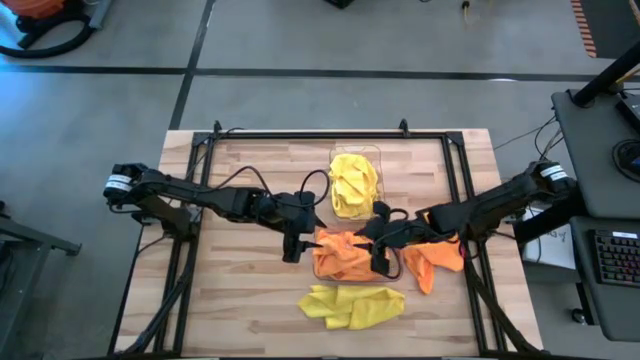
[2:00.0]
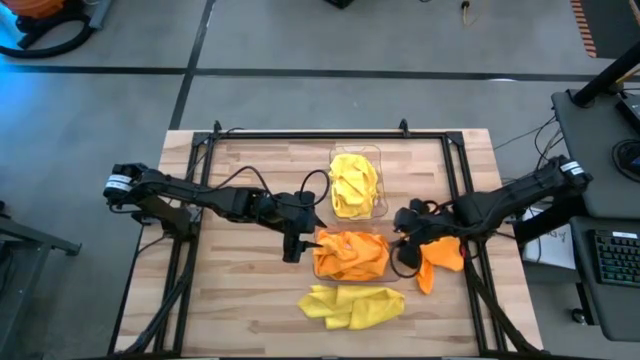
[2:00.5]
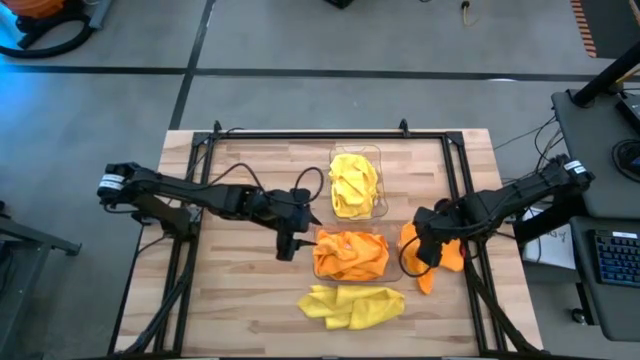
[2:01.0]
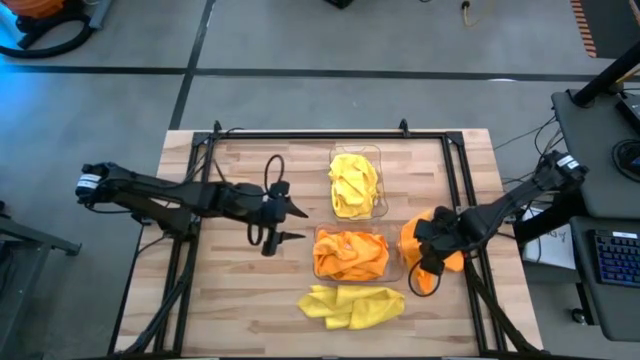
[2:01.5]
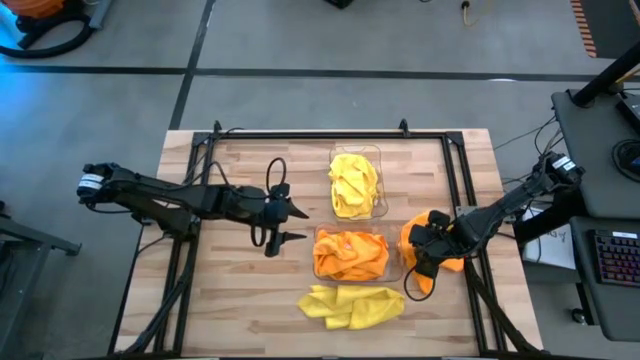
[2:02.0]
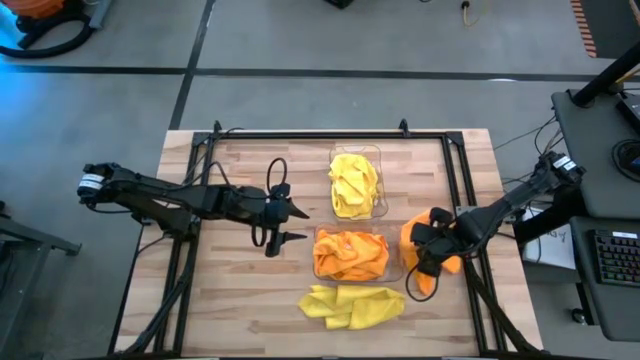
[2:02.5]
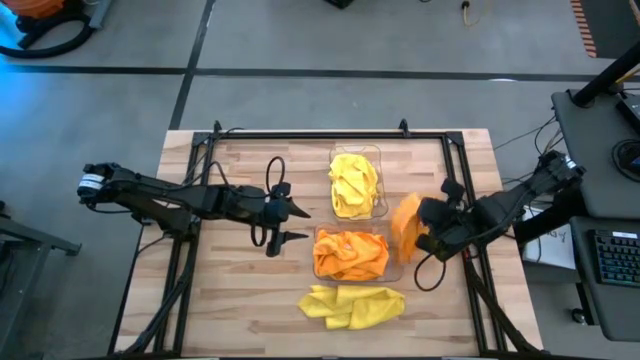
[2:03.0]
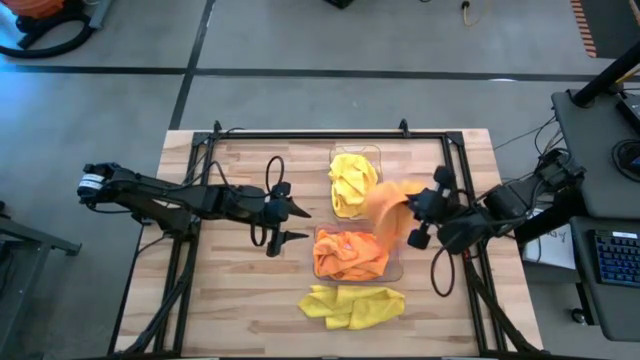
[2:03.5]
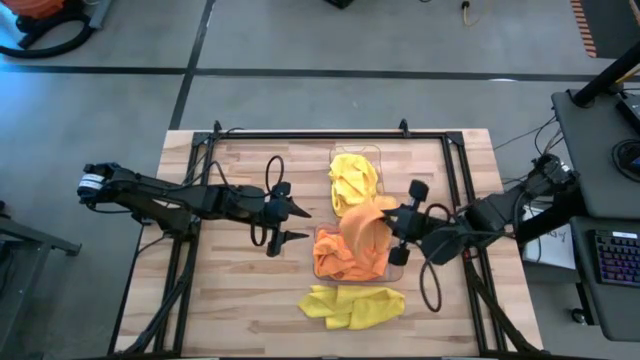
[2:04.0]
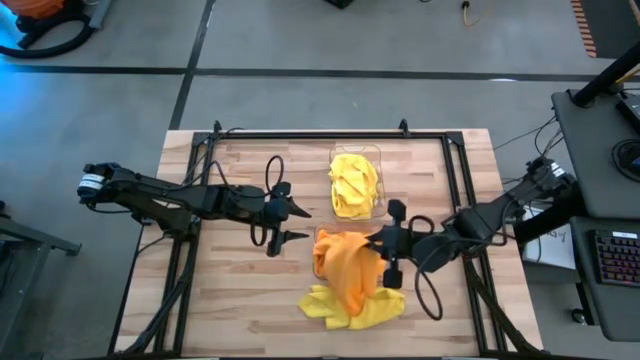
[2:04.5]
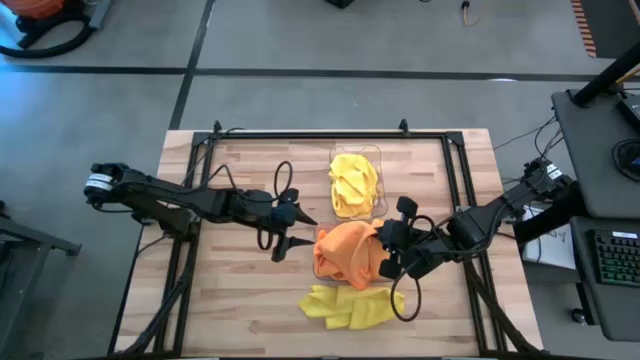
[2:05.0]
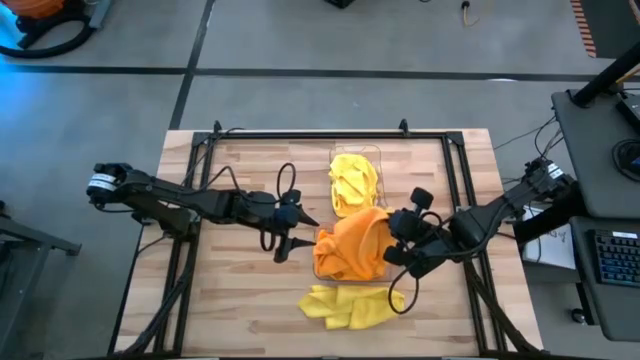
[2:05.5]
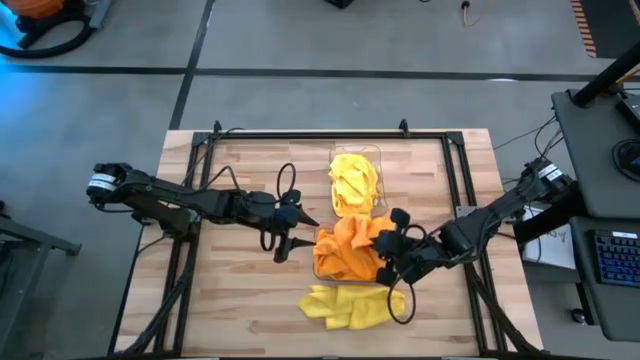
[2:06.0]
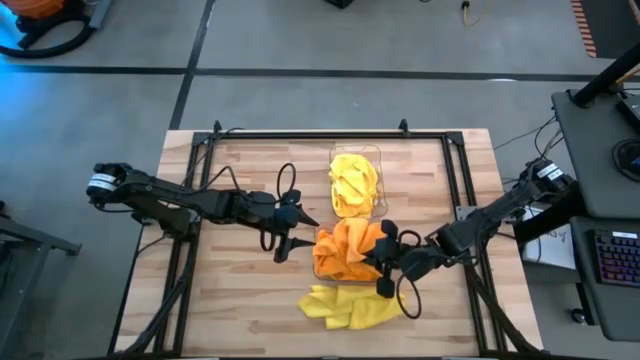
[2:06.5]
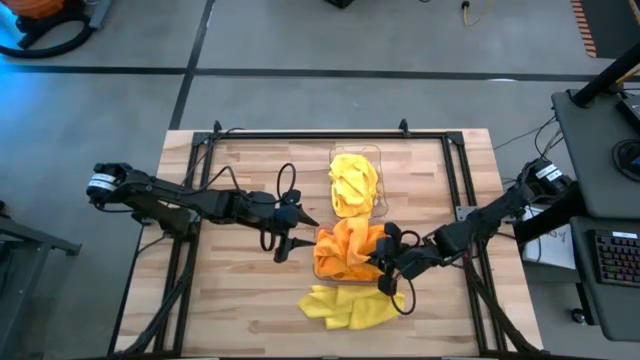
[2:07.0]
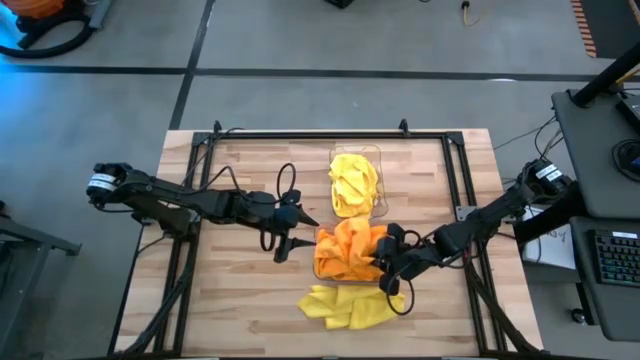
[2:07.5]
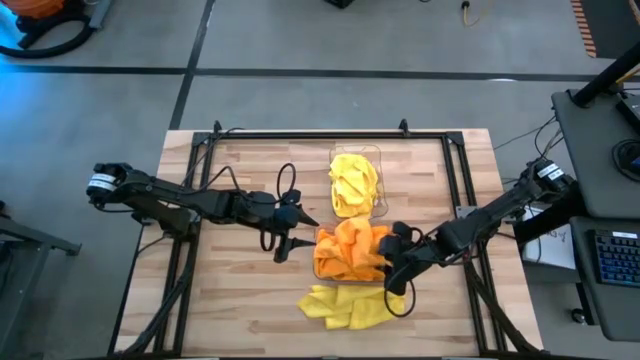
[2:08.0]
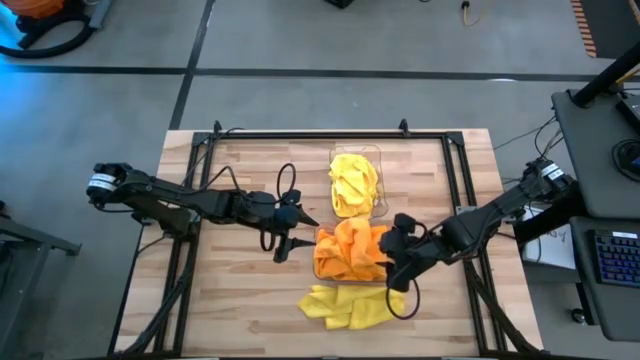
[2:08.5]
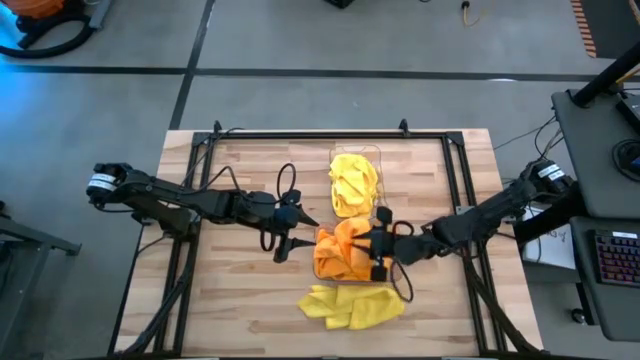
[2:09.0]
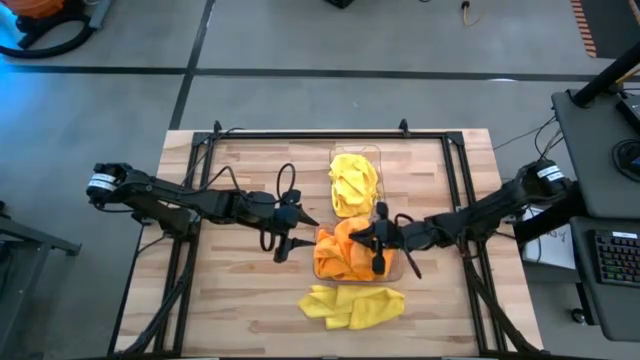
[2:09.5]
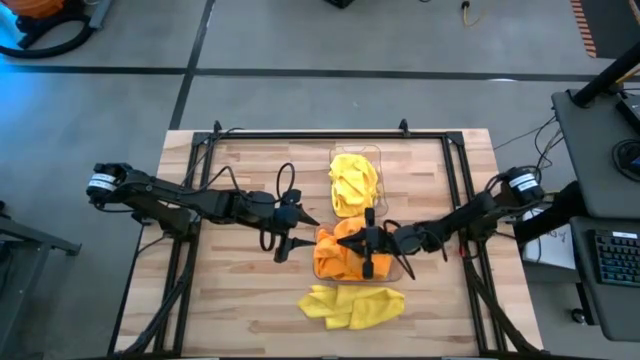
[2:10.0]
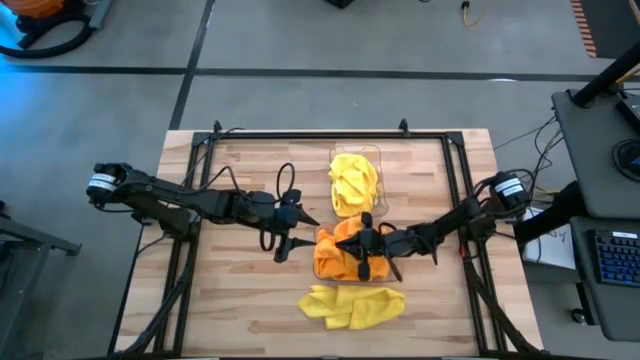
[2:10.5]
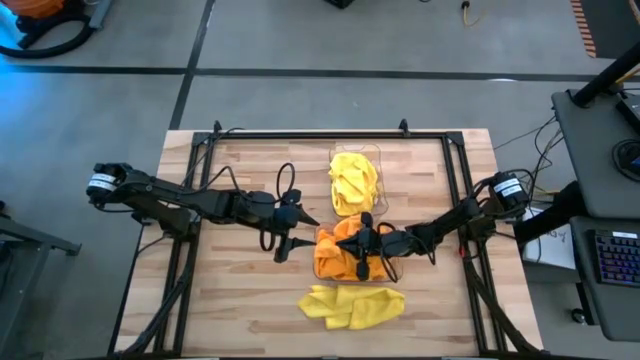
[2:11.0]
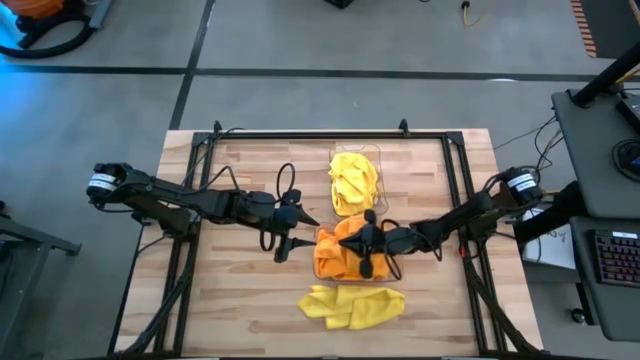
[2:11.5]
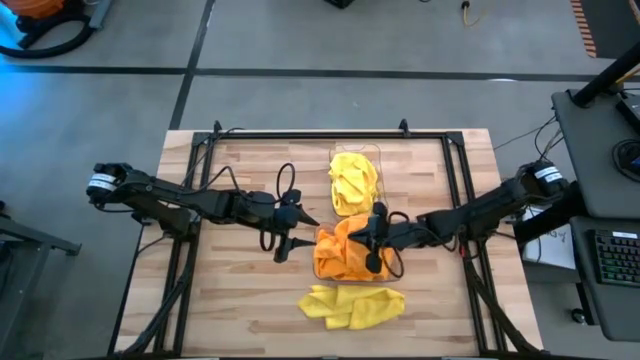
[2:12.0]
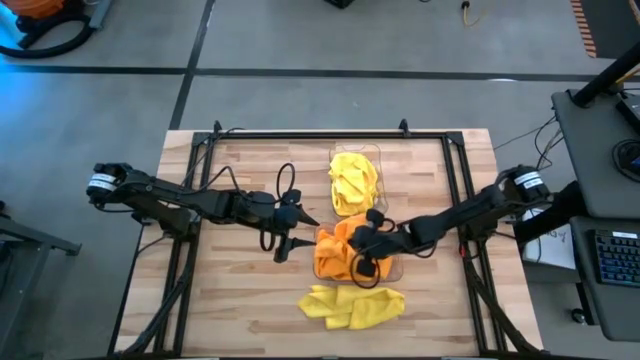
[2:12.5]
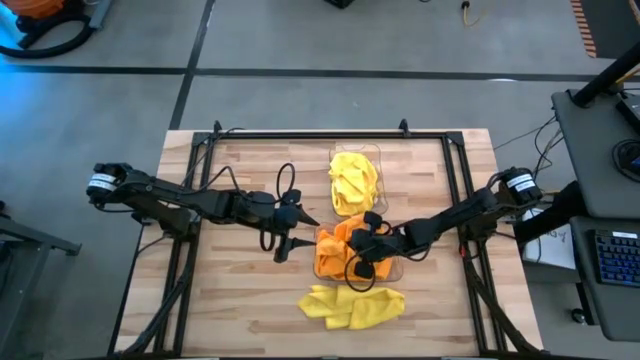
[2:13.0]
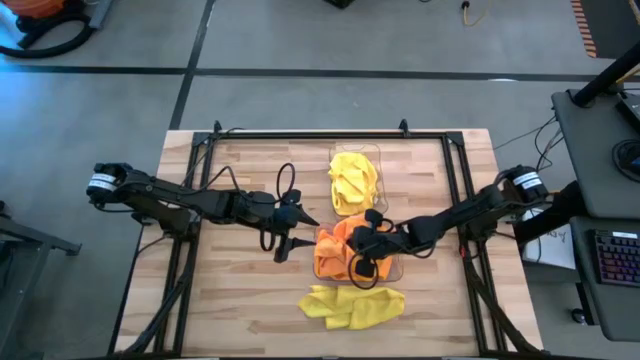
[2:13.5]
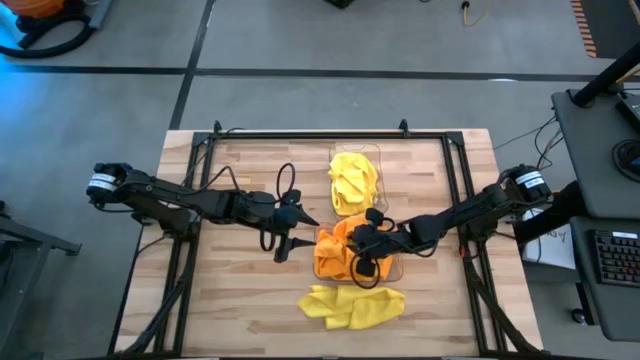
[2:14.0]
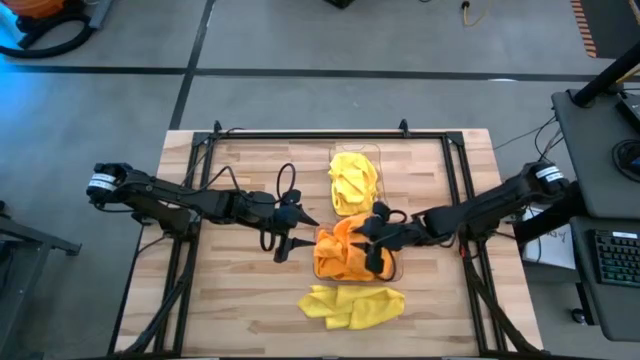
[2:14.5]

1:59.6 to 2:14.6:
Task: Sort microfiber towel by color & place in baskets
Put the orange towel into the bottom transparent bin

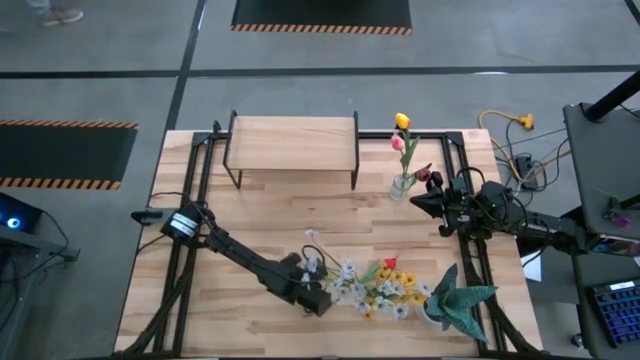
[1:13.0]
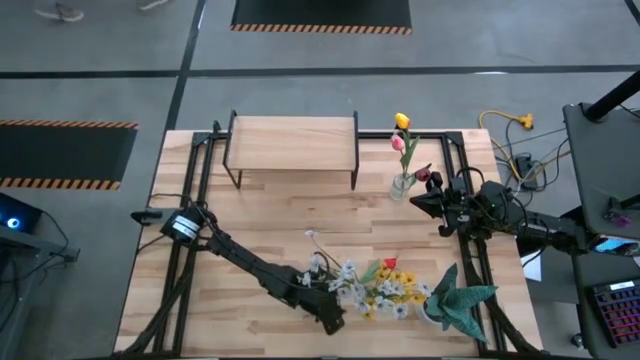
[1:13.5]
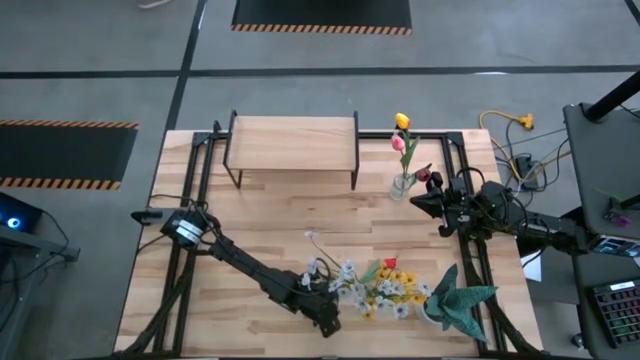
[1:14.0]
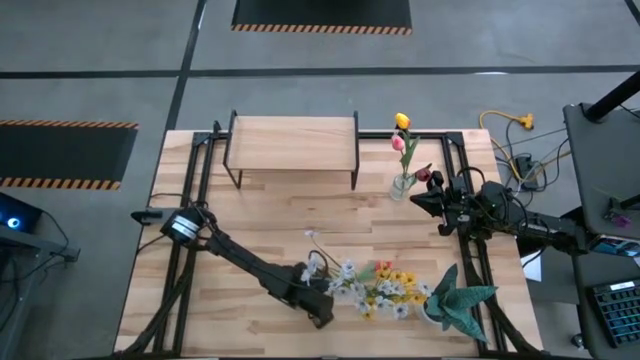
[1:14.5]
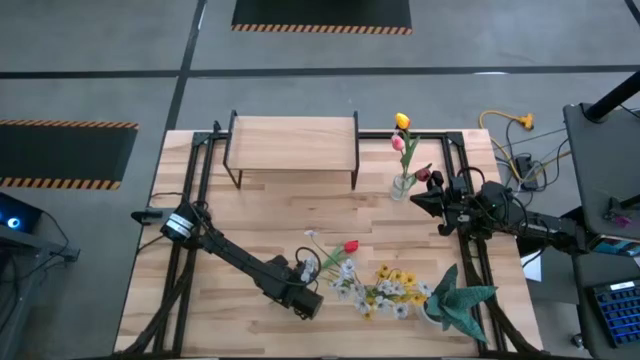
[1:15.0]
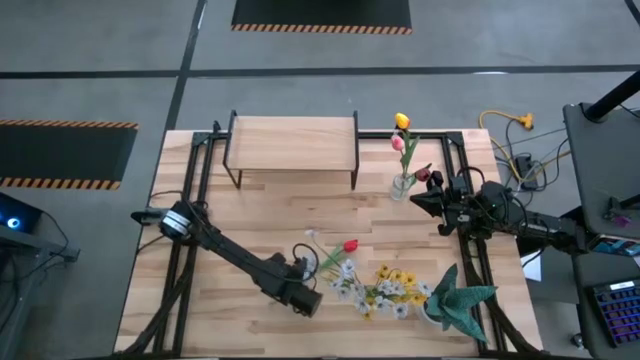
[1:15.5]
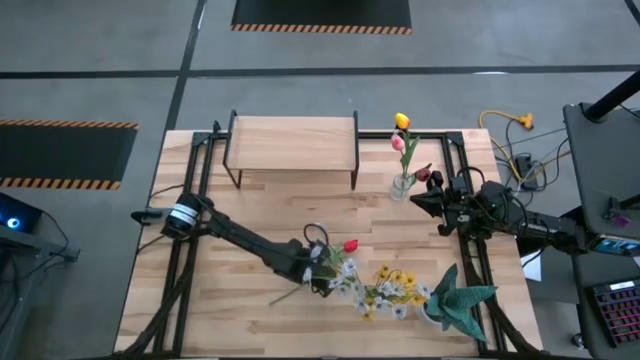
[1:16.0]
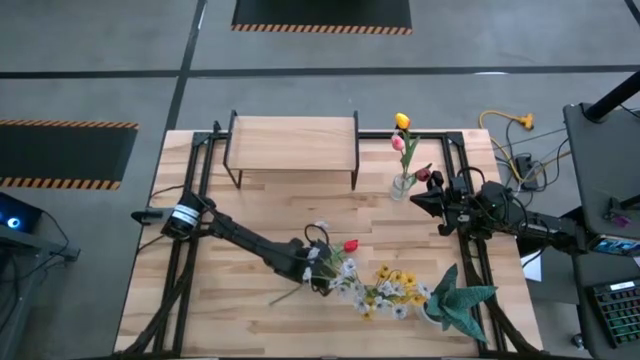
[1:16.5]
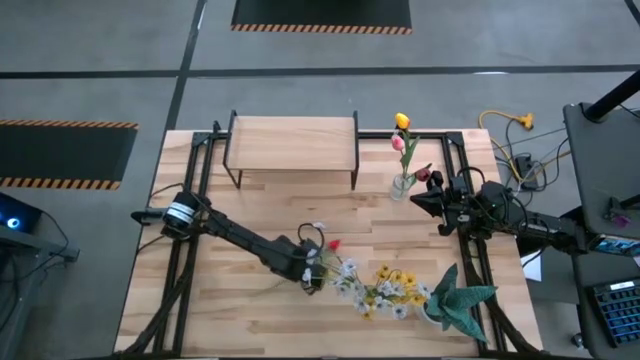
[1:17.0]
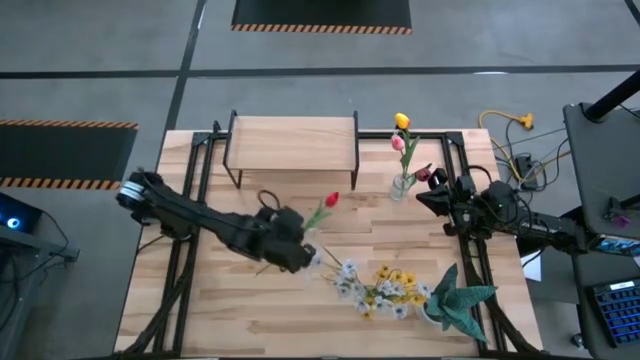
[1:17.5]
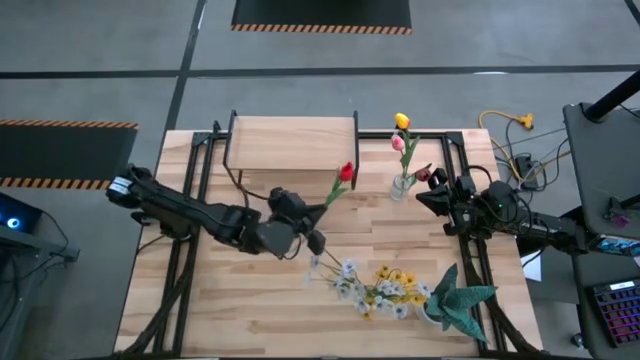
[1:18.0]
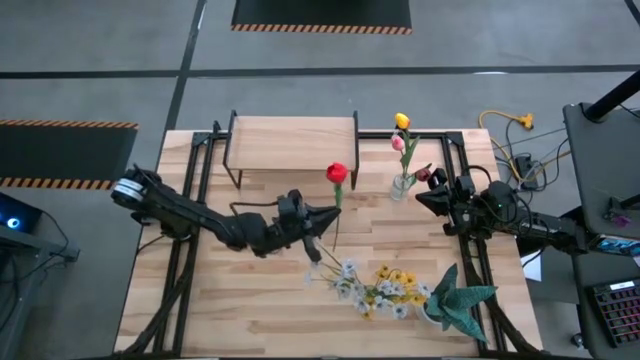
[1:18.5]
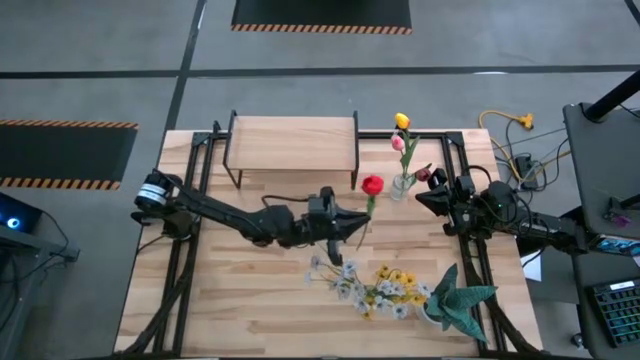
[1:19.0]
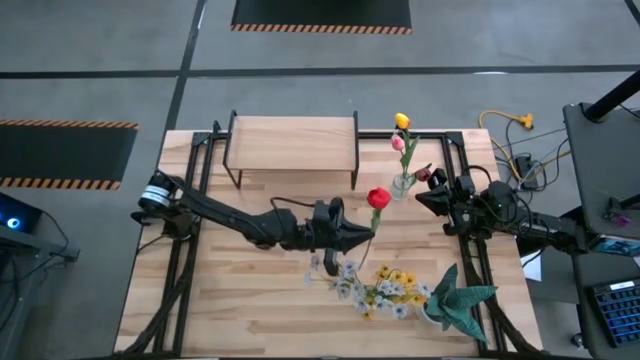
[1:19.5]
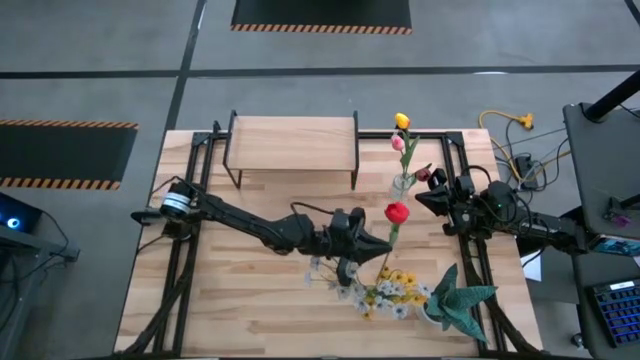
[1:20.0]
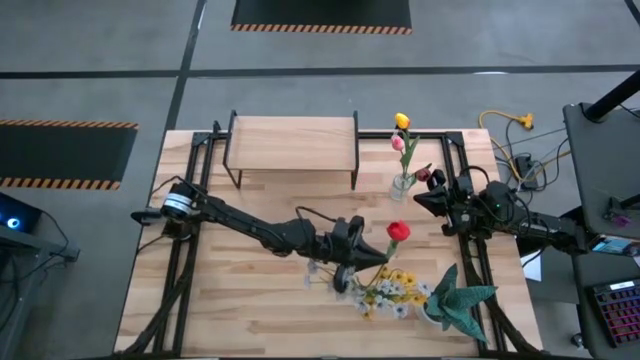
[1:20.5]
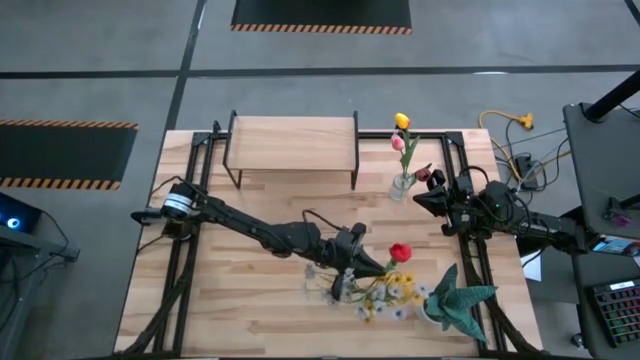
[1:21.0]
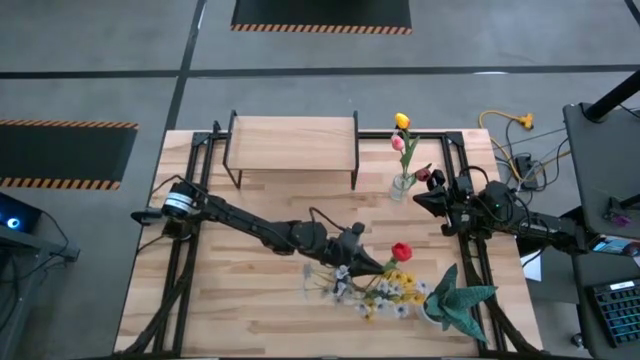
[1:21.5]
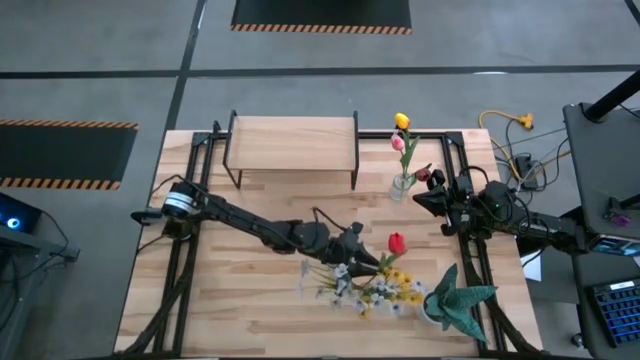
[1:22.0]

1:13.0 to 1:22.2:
Task: Pick and place flowers into a vace then onto a shelf
Put the red tulip into the bottom transparent vase
